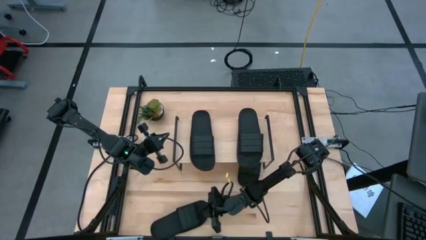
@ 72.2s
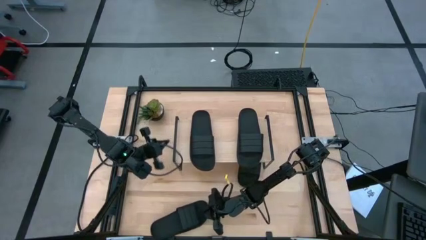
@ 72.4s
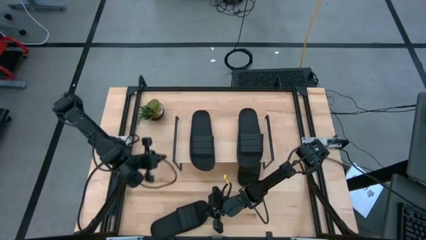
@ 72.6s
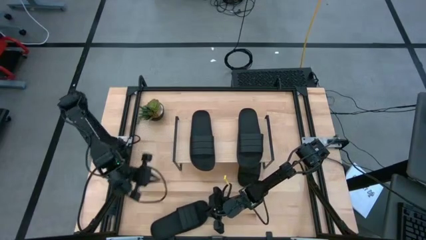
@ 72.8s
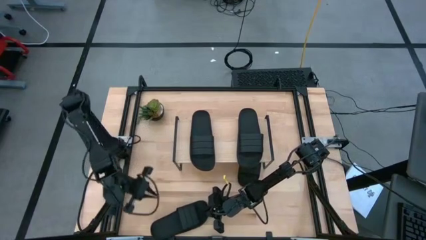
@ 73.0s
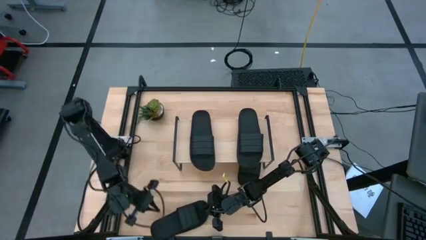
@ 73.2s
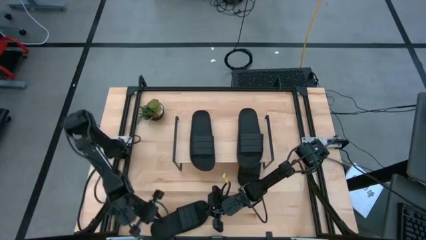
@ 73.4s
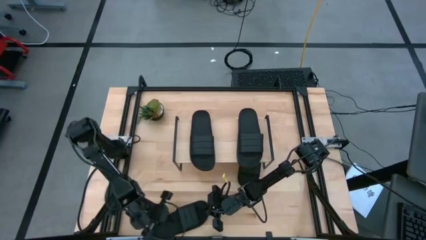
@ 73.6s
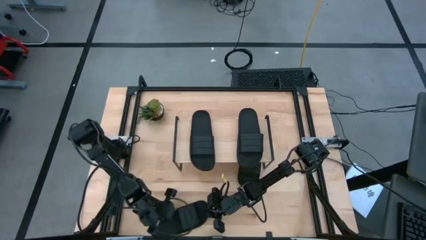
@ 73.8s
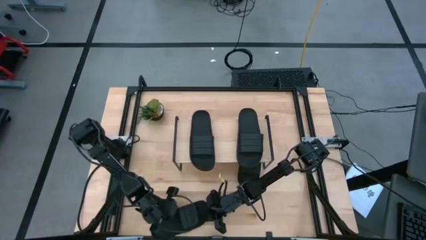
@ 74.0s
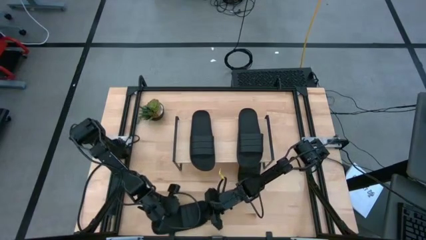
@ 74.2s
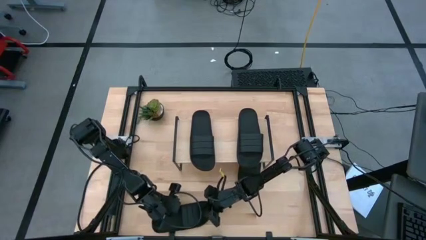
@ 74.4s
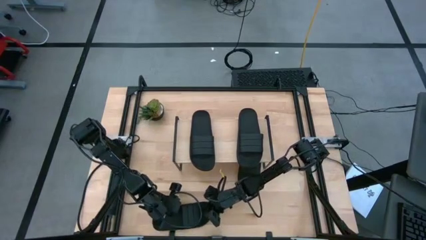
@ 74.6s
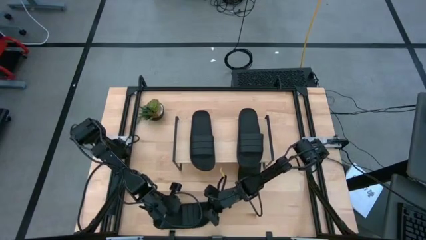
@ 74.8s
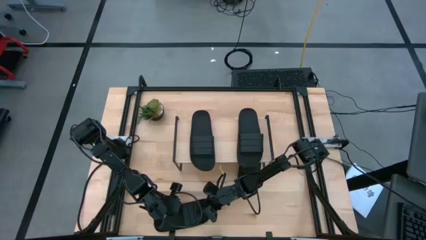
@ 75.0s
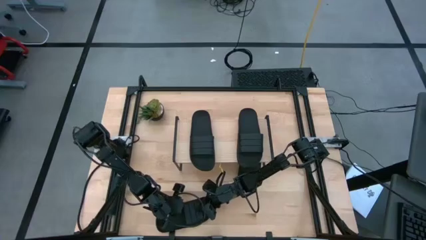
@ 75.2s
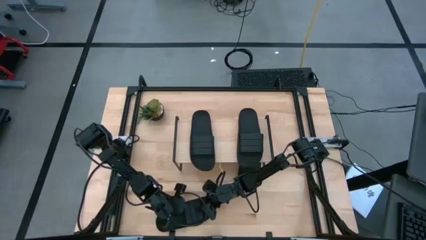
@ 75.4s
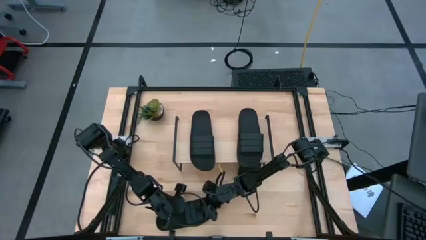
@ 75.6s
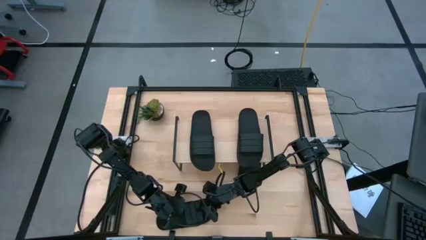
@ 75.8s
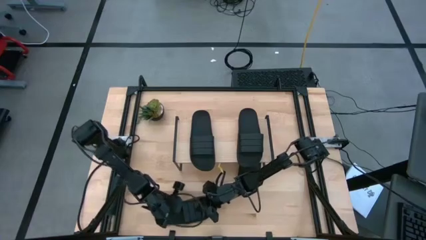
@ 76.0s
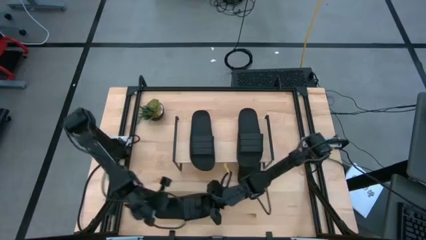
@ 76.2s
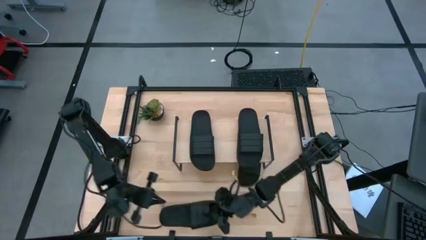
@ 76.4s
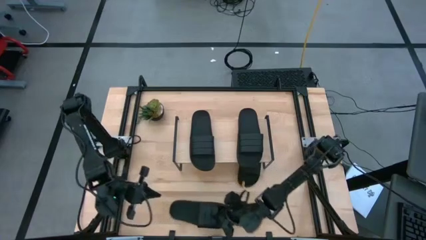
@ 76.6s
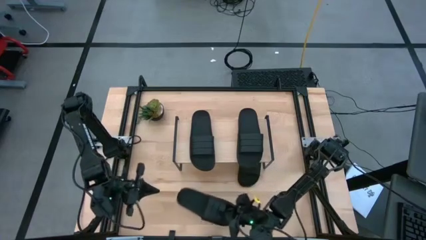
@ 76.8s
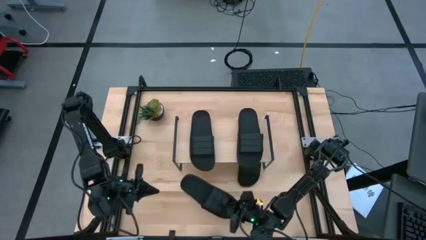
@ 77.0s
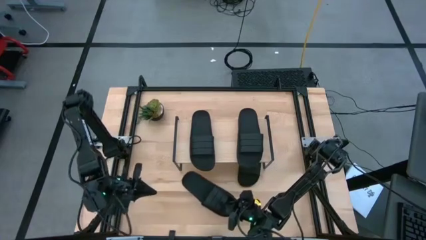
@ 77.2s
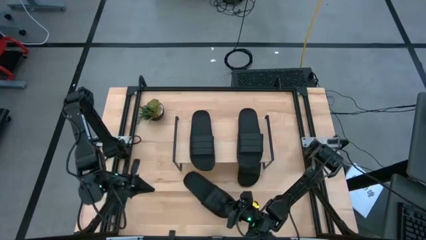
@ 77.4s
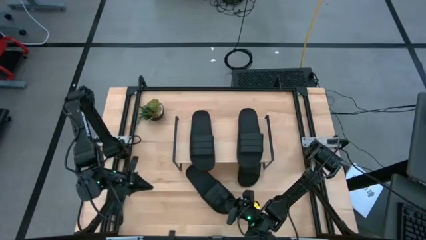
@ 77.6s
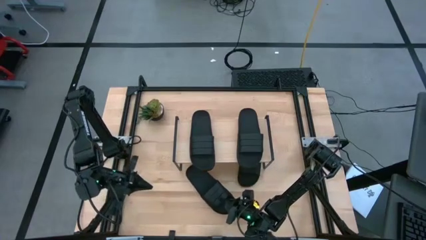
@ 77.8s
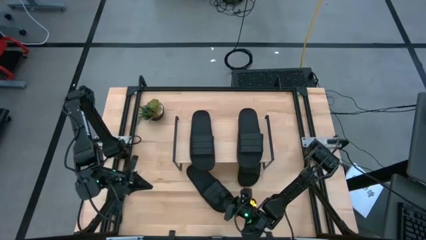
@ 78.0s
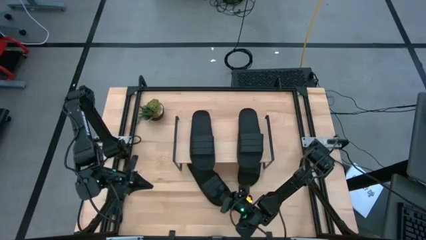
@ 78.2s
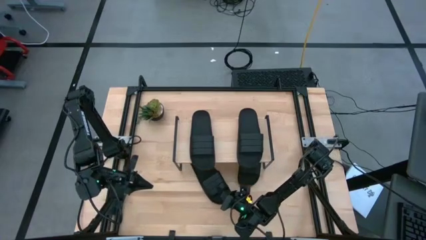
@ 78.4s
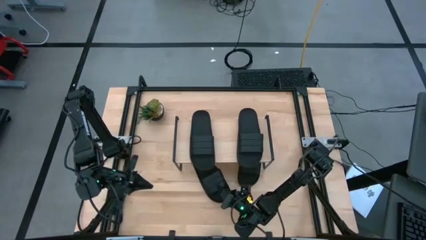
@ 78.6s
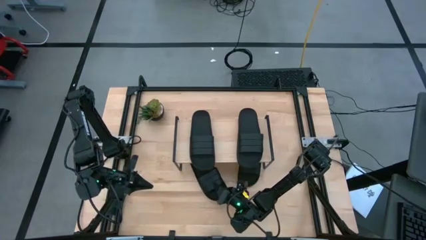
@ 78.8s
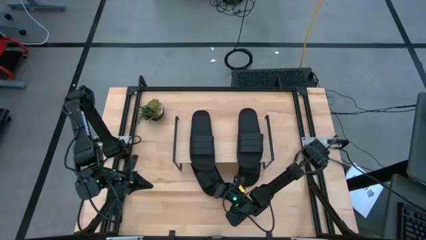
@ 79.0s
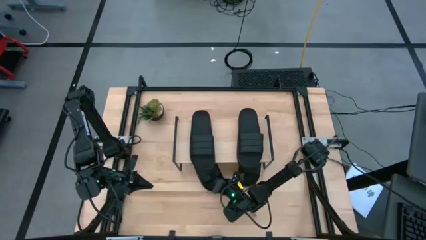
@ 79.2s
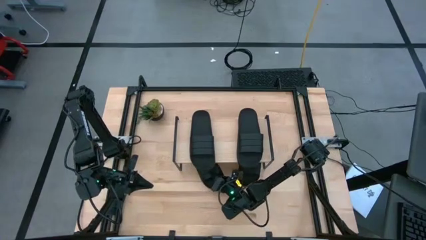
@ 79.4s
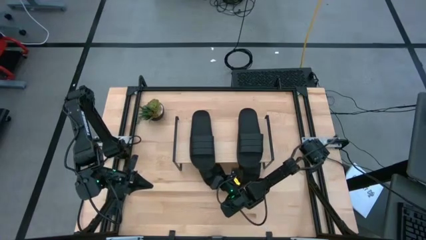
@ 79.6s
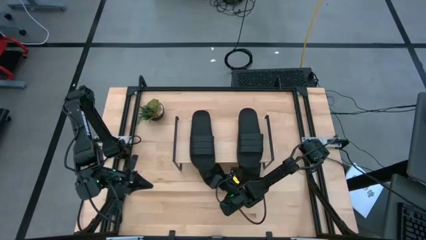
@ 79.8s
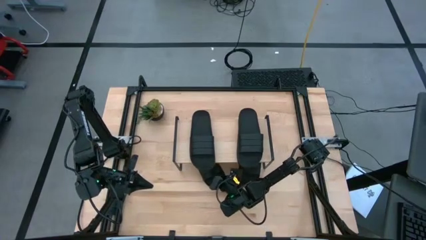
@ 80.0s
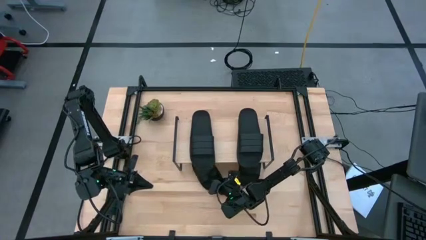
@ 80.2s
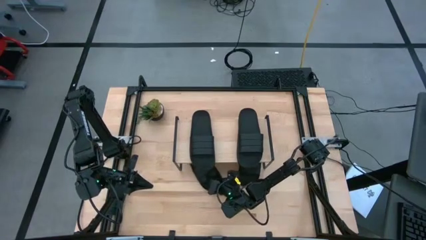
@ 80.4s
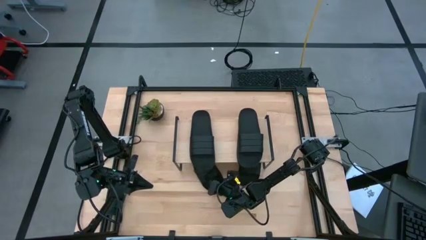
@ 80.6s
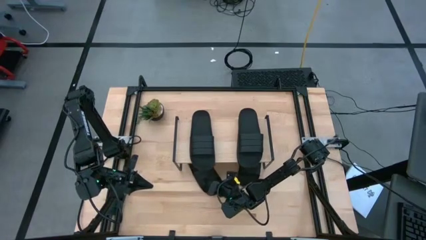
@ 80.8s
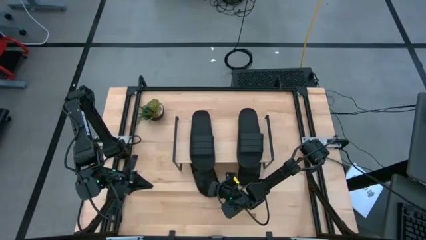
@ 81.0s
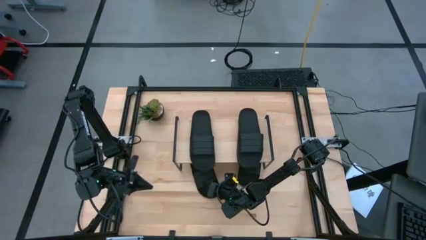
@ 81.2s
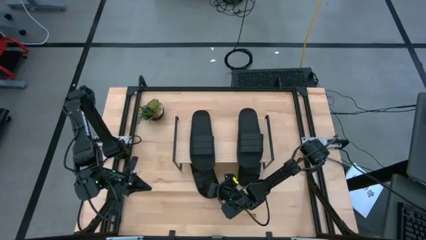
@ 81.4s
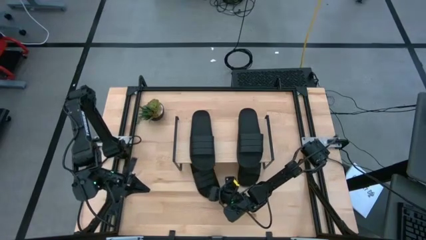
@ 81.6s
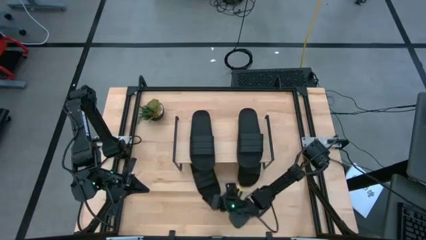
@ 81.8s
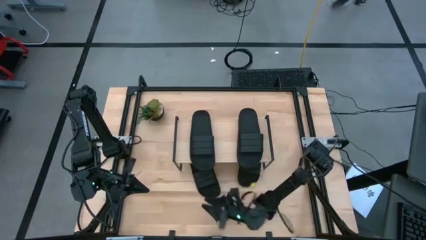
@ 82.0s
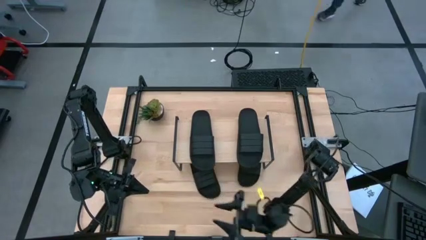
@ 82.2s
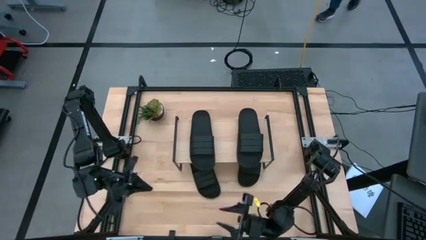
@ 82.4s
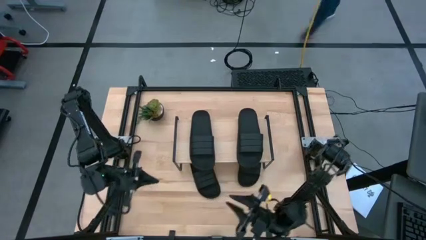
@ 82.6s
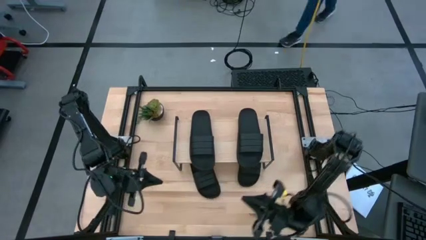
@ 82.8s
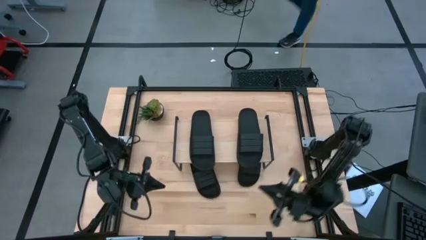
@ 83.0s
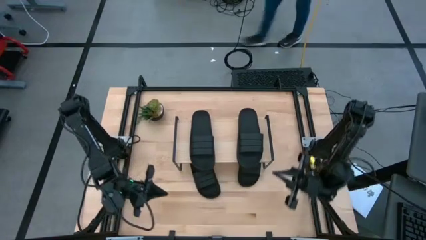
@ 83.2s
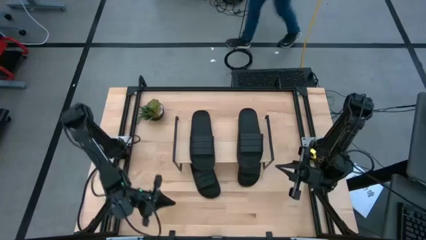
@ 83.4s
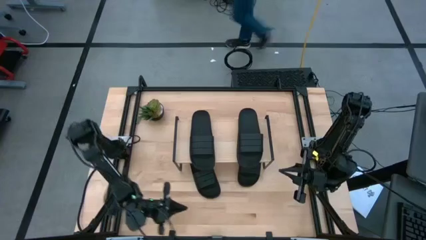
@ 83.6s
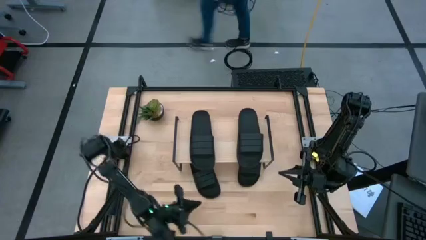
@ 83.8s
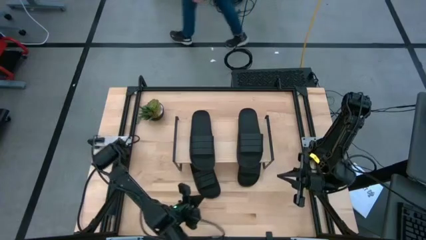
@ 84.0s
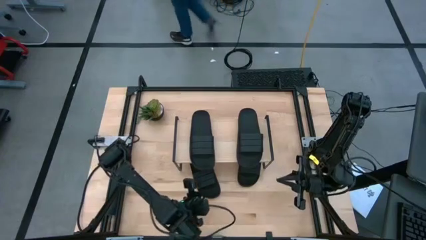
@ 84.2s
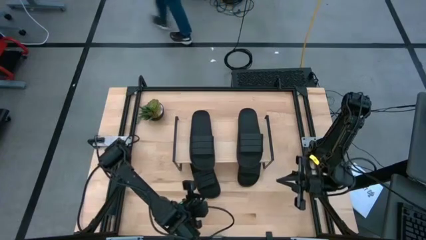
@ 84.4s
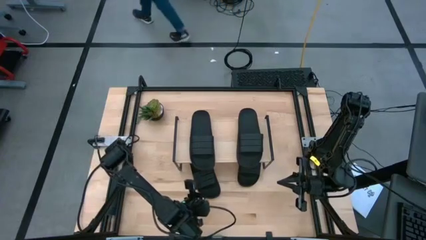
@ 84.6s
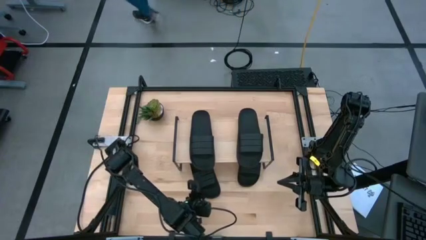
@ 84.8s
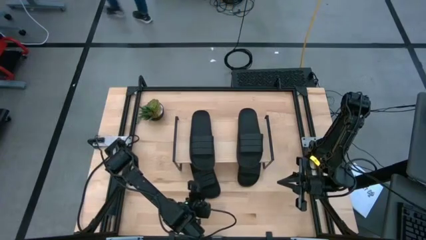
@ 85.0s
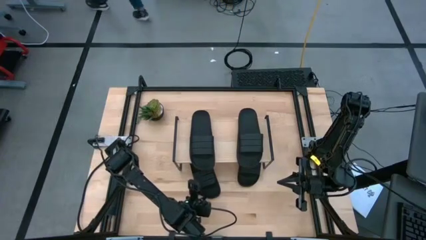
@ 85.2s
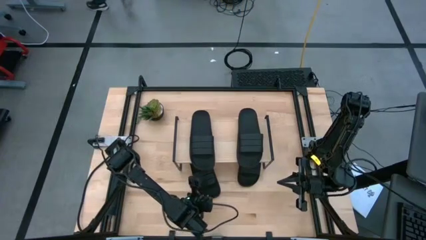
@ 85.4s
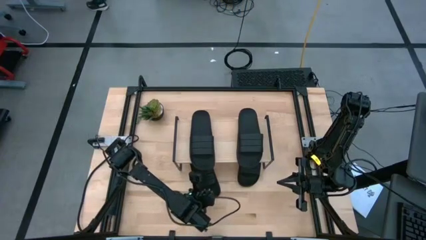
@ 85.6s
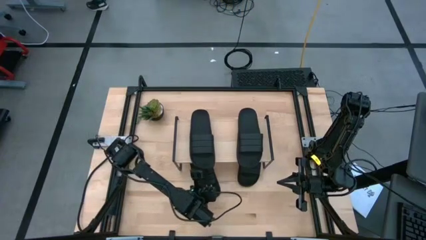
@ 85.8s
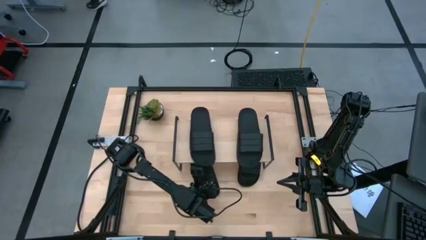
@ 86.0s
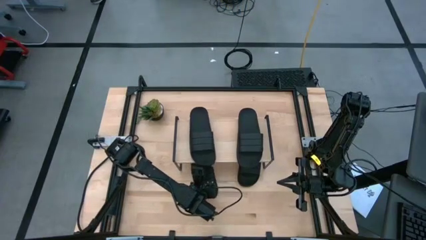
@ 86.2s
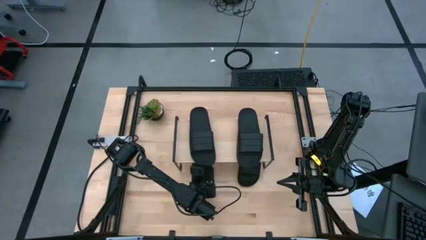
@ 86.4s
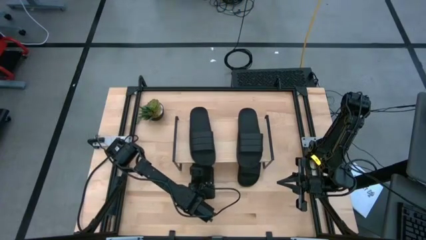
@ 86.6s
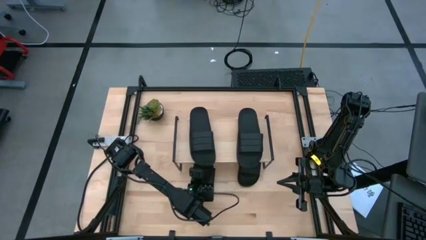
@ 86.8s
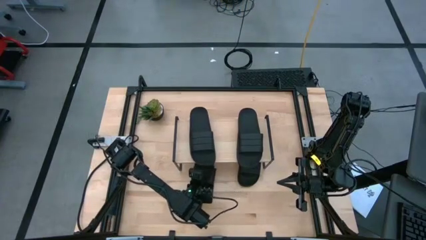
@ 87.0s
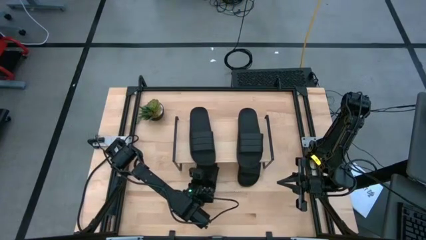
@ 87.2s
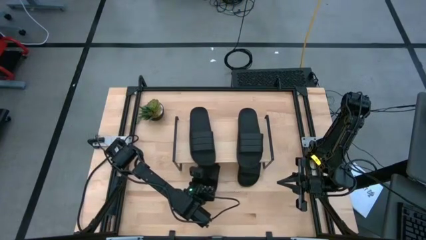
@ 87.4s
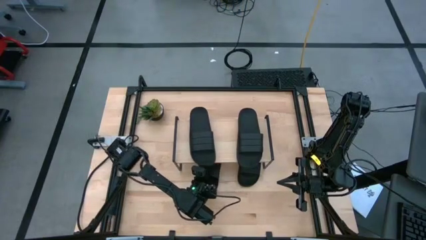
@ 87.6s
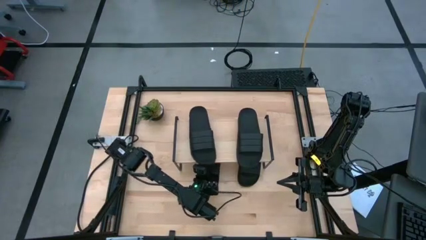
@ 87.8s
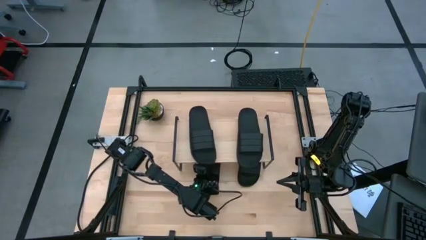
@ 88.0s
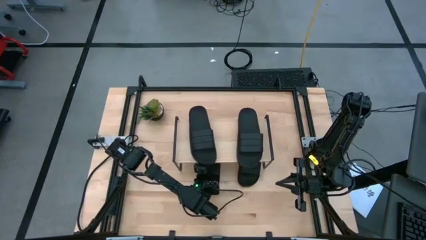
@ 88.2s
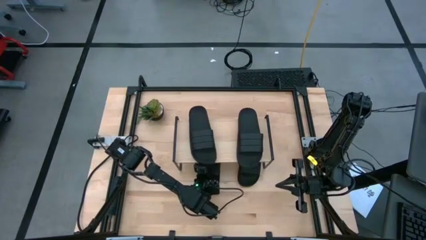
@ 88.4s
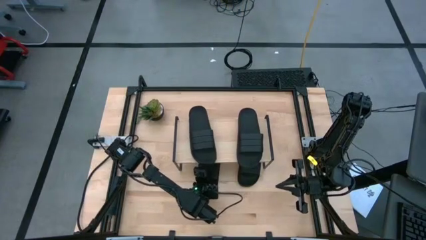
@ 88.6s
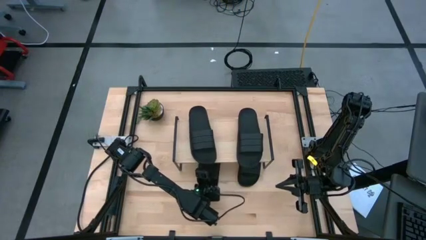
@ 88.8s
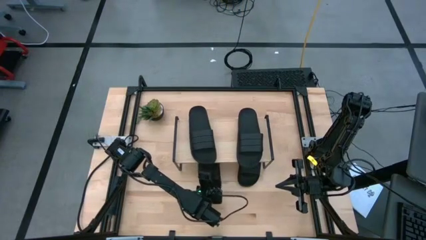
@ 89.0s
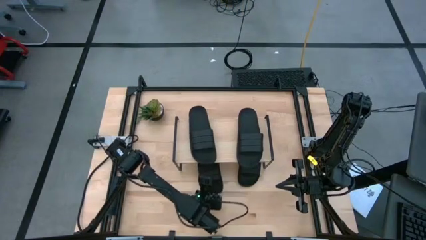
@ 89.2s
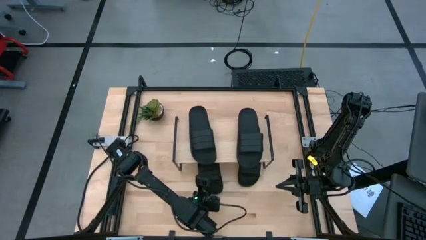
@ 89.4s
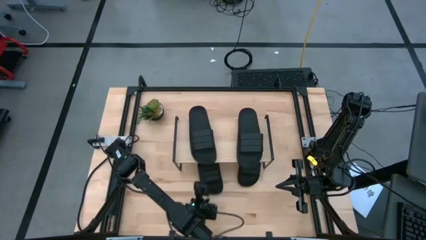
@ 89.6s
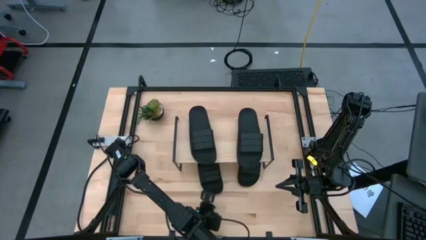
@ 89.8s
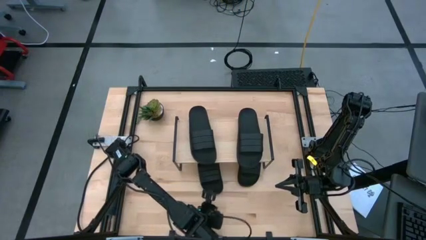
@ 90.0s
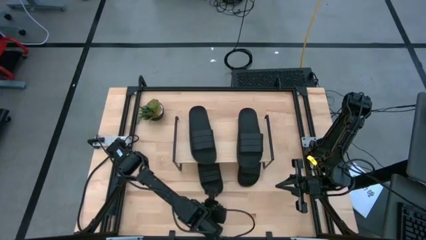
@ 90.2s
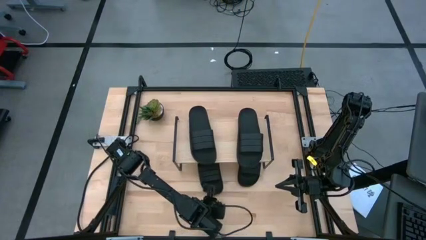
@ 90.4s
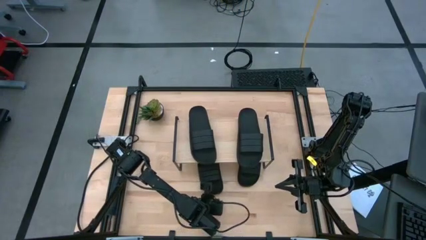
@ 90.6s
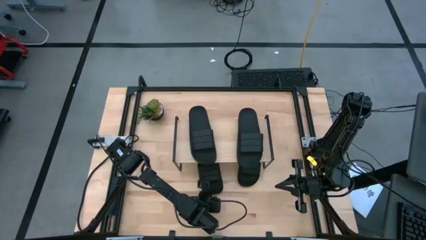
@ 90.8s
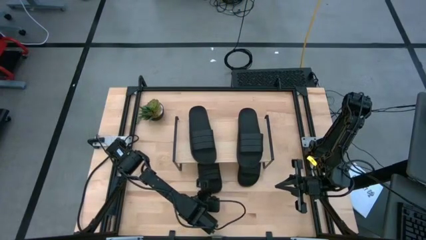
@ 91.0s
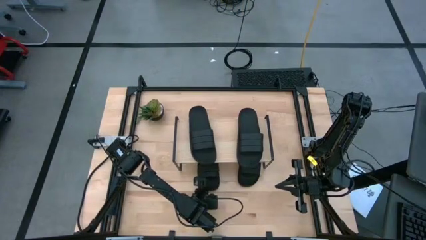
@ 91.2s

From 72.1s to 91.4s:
Task: Pick and place slides into the shelf
Put the left black slide under the shelf
